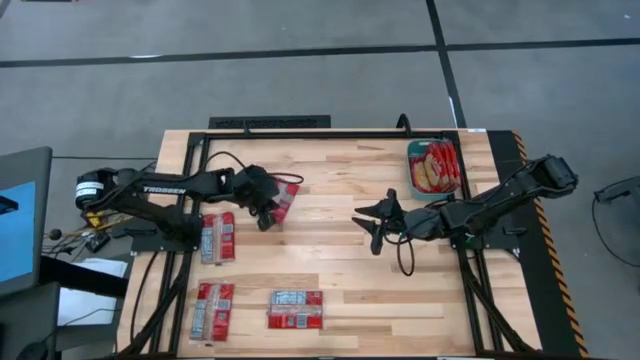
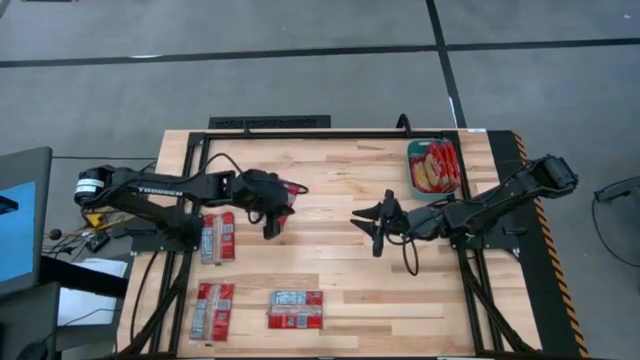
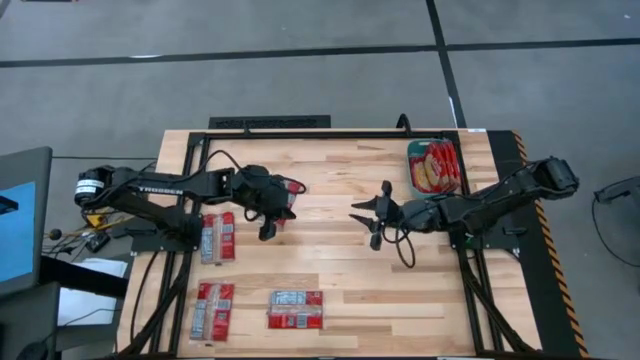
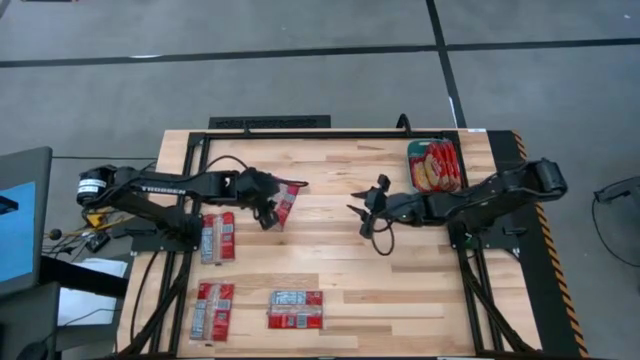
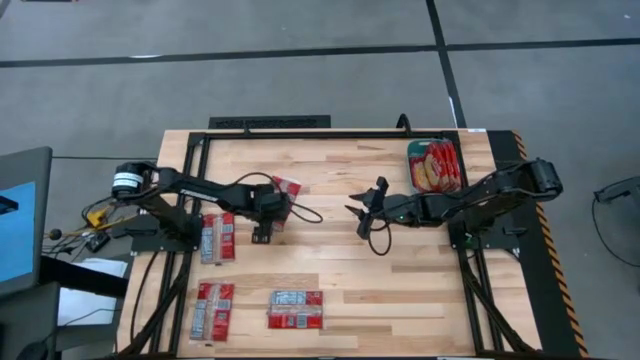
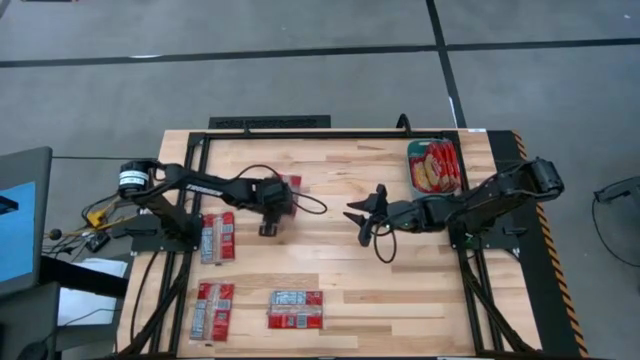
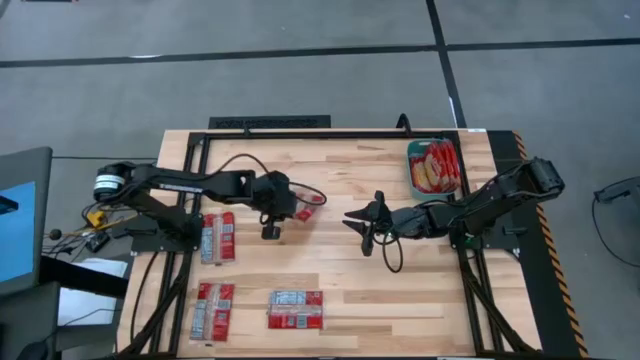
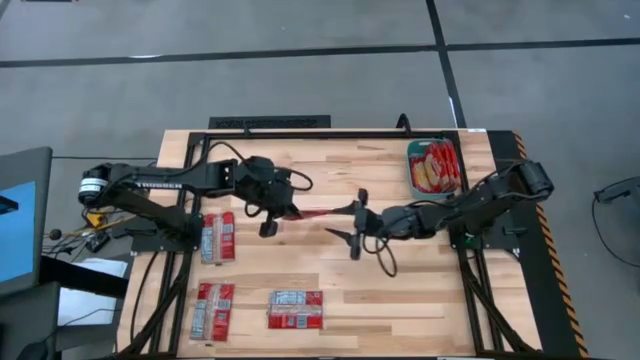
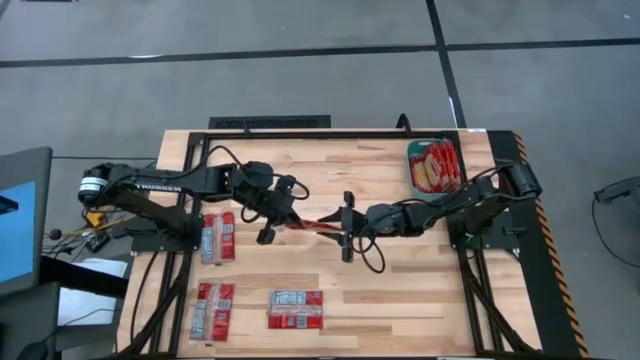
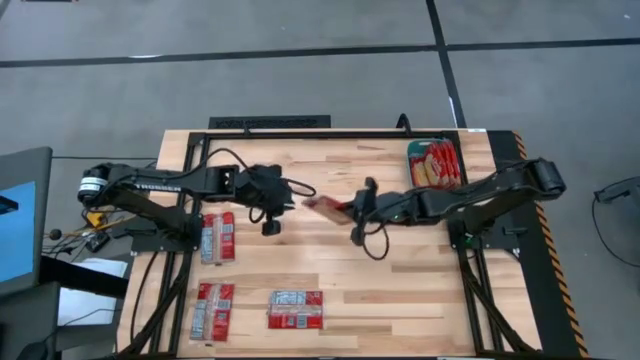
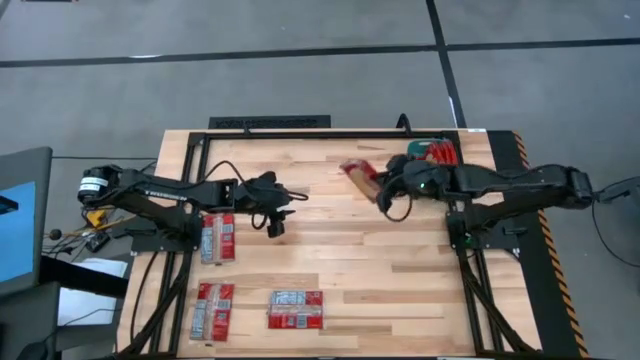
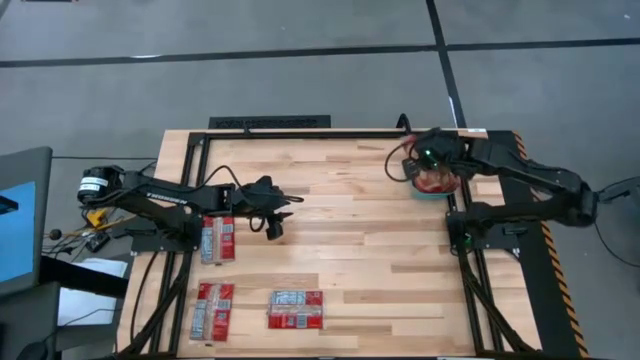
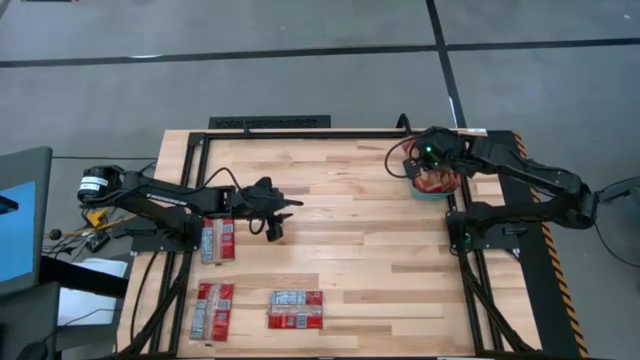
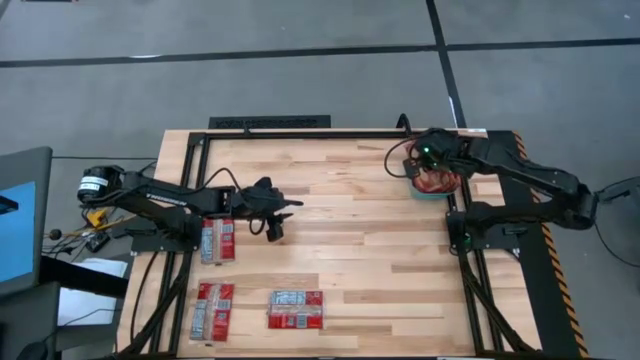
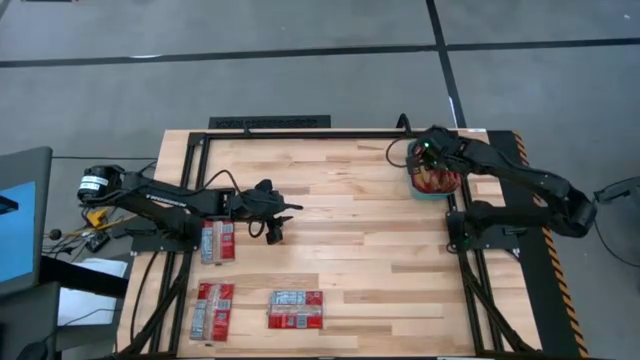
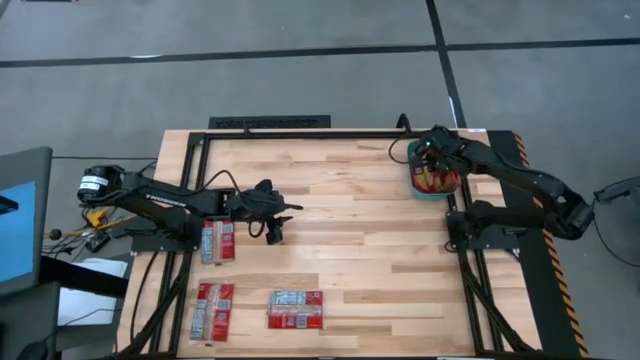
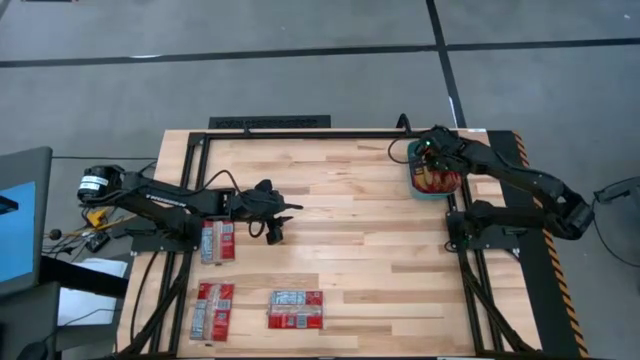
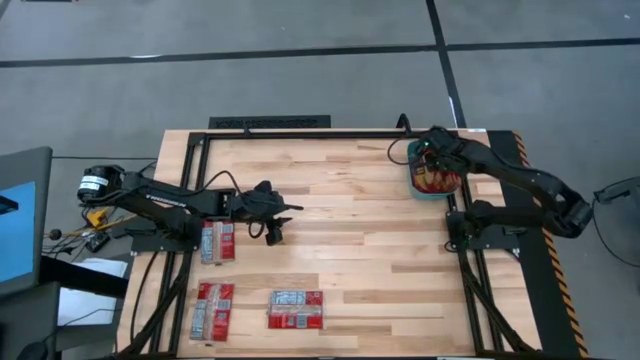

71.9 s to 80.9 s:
Task: Sort popcorn bags into baskets
Put the popcorn bag into the green bin

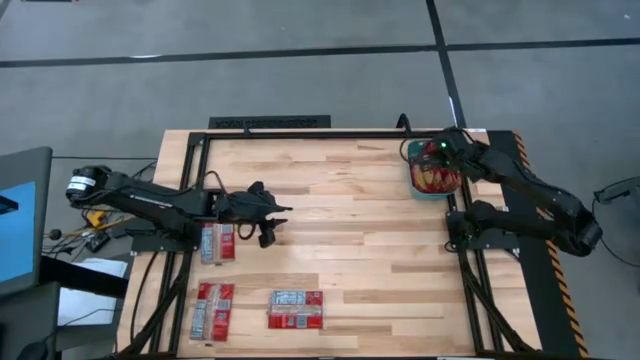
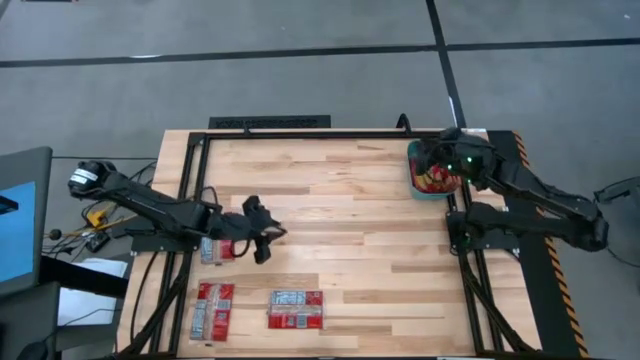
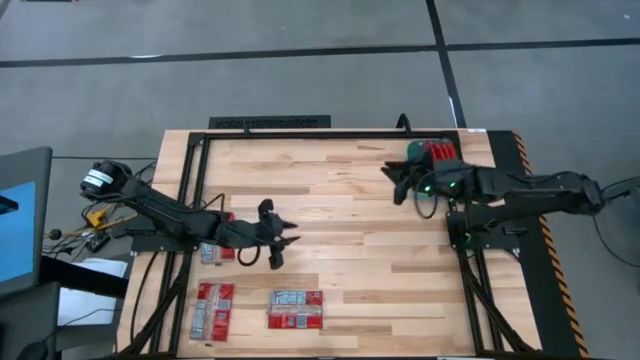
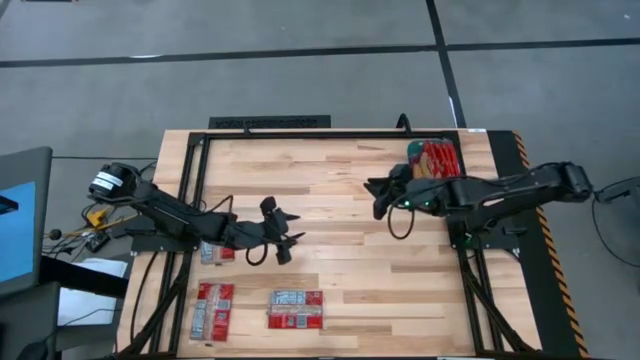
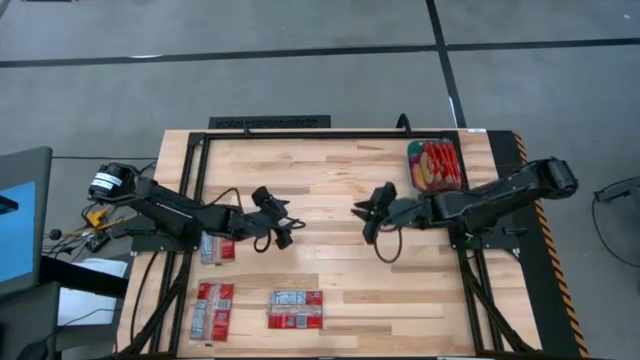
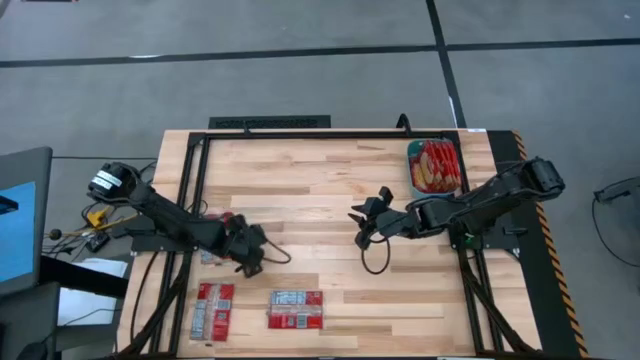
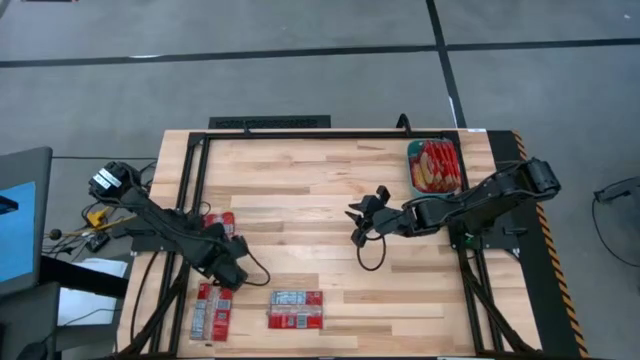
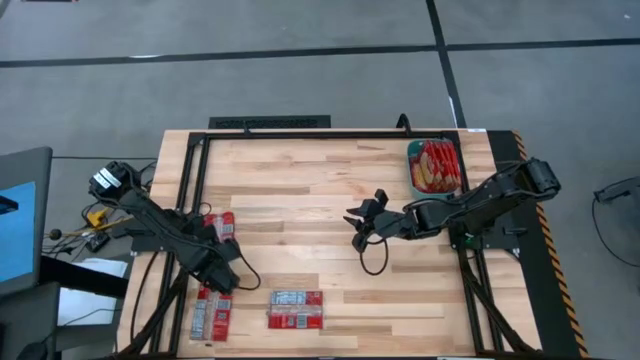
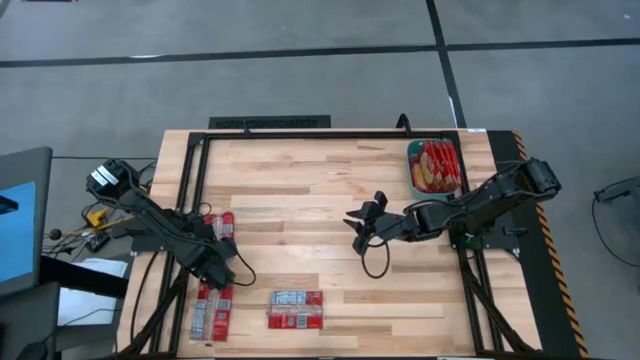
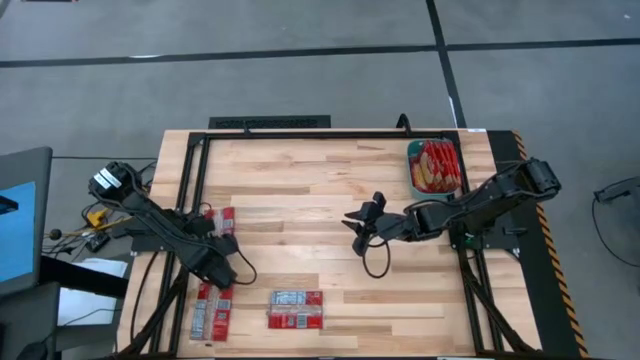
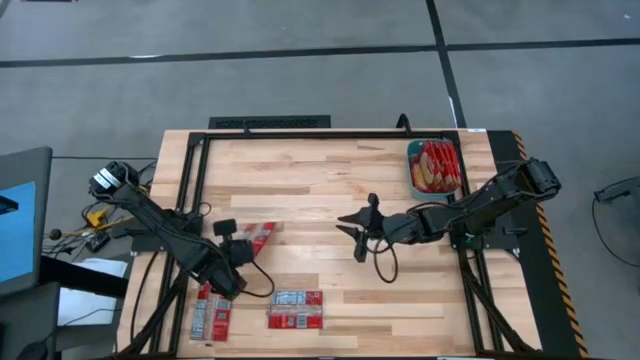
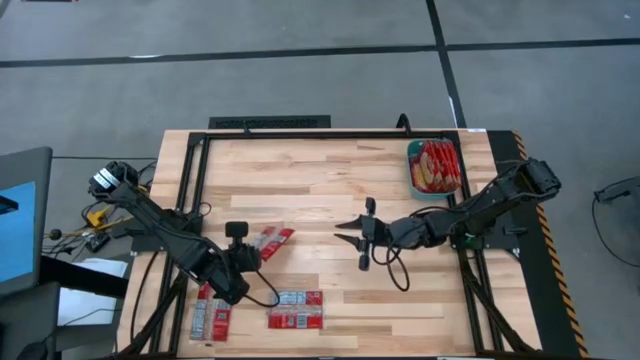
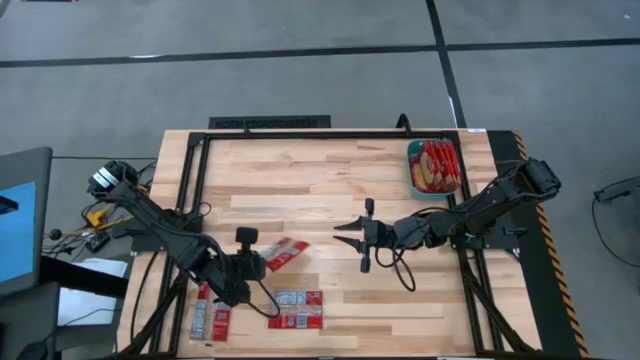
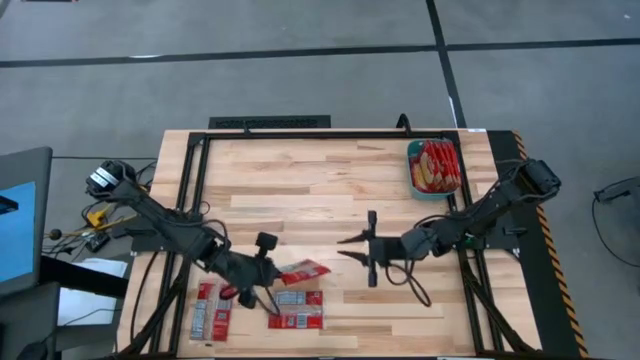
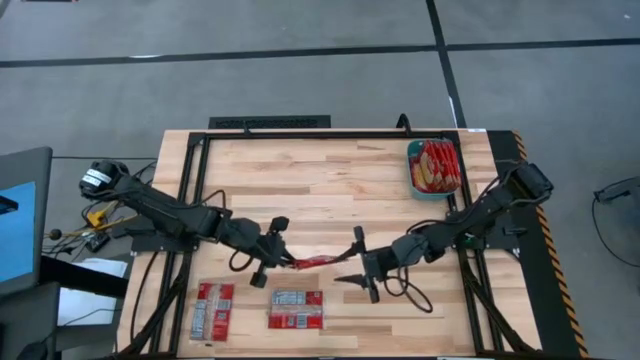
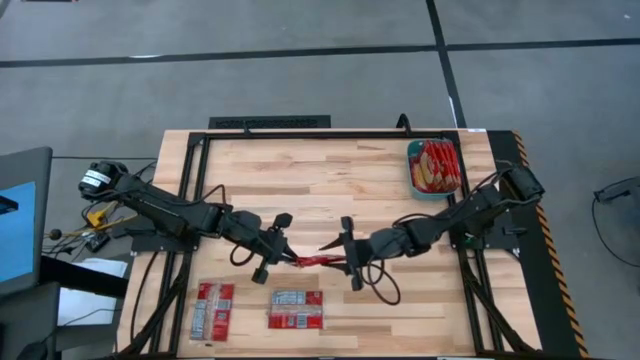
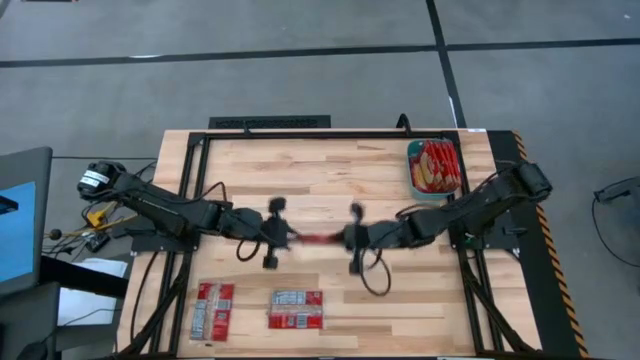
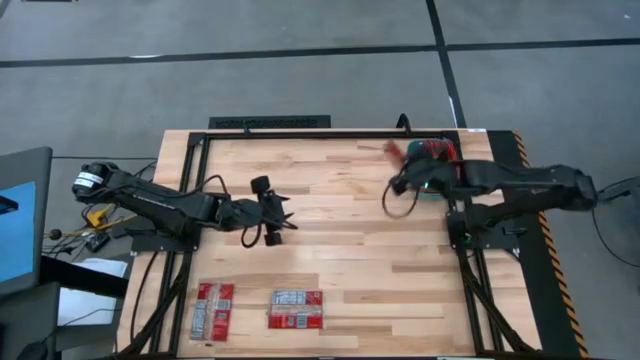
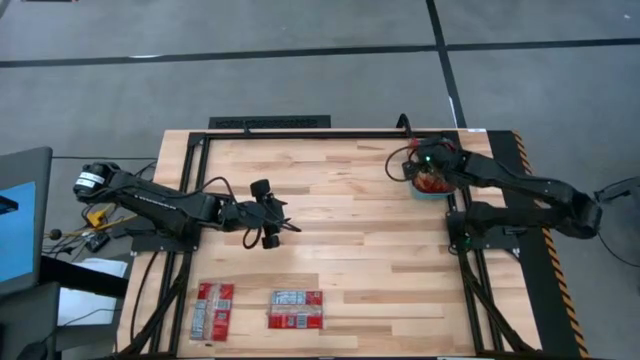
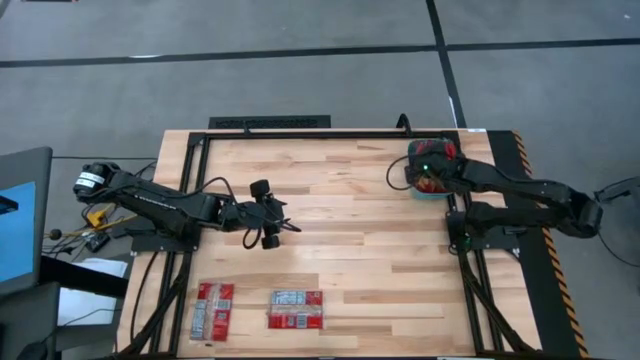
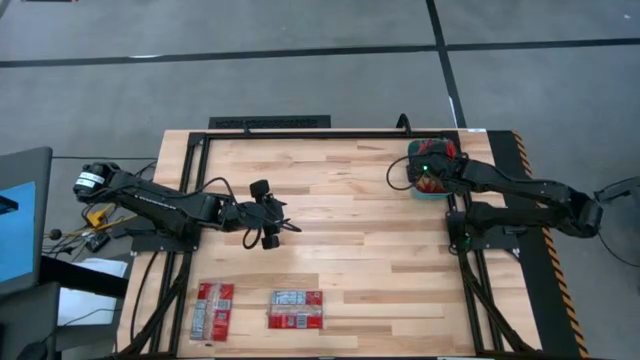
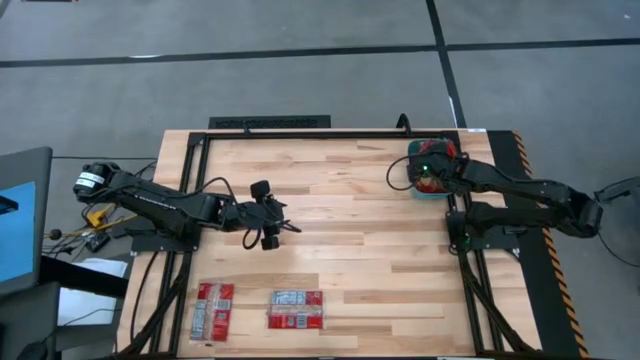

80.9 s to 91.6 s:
Put the popcorn bag into the green bin

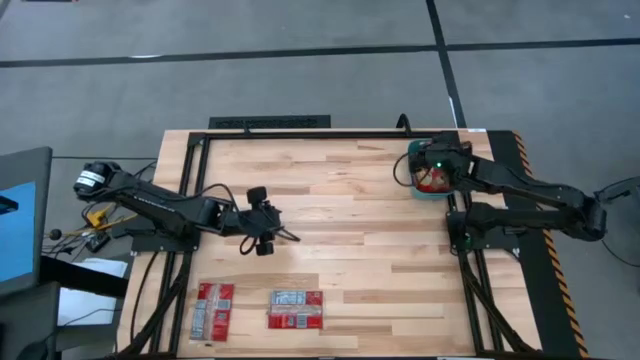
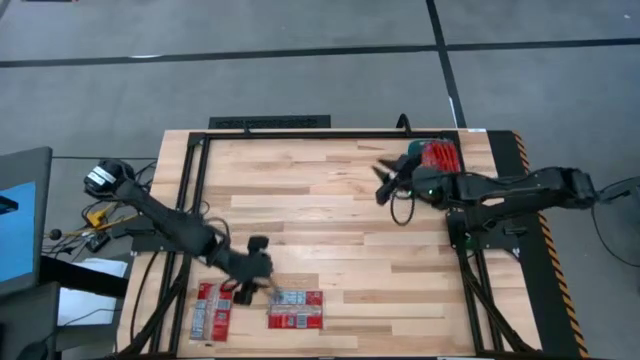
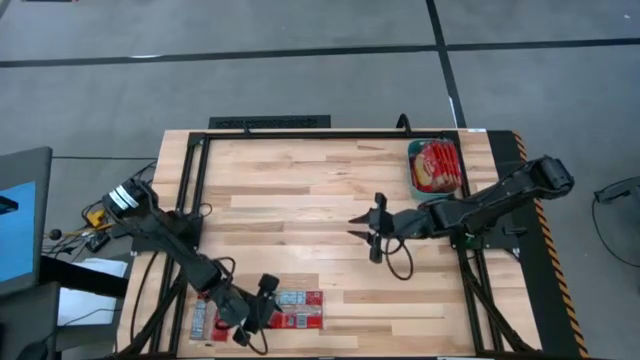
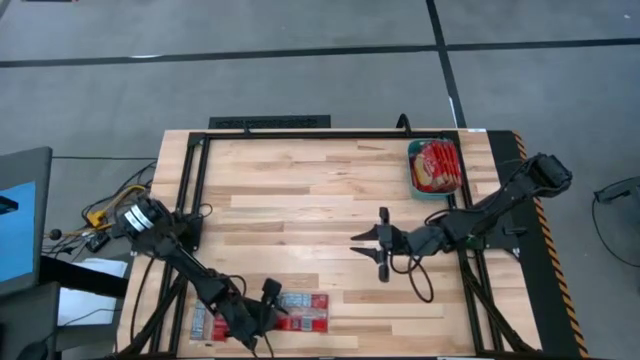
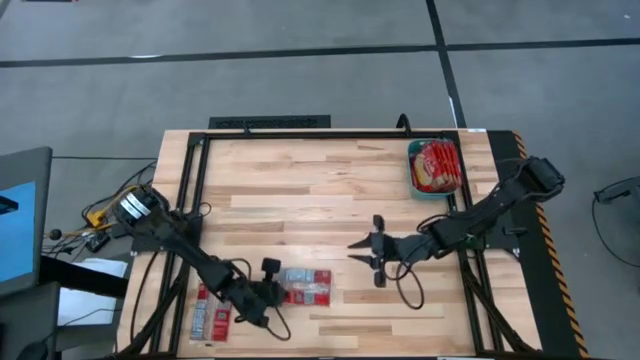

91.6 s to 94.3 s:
Put the popcorn bag into the green bin
